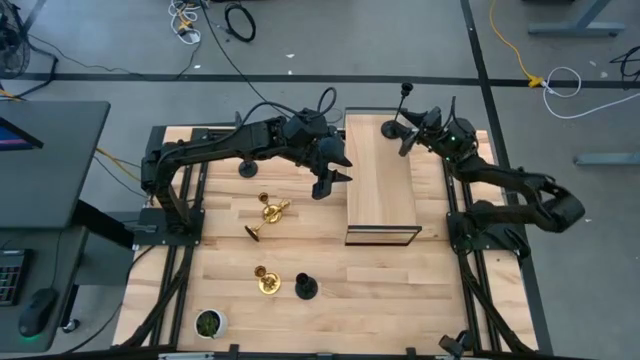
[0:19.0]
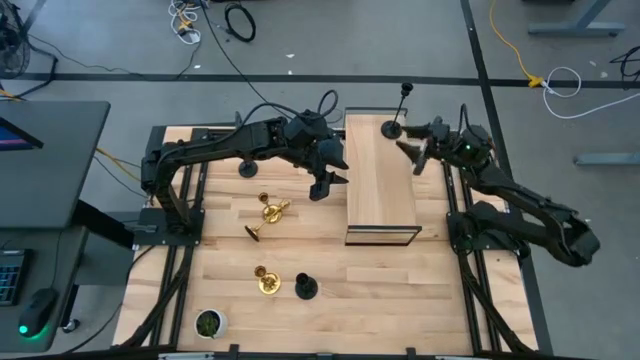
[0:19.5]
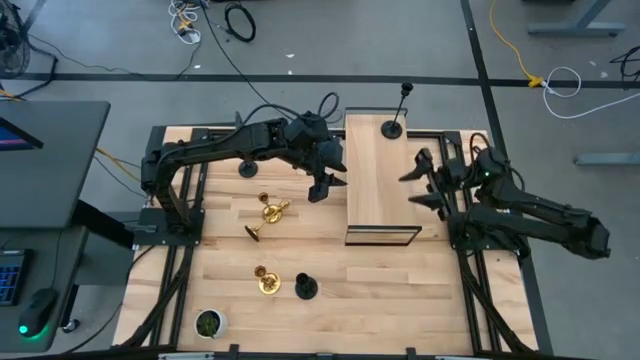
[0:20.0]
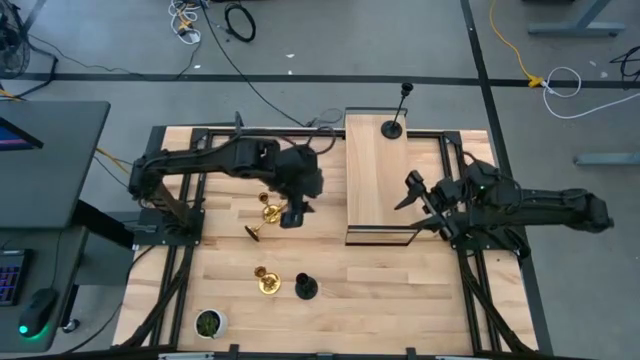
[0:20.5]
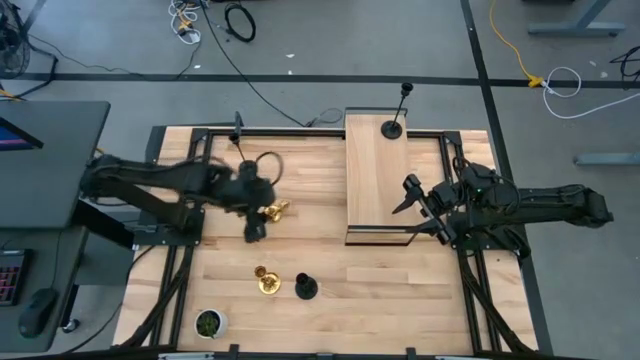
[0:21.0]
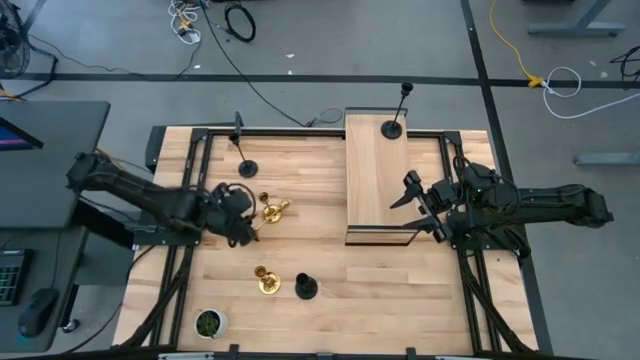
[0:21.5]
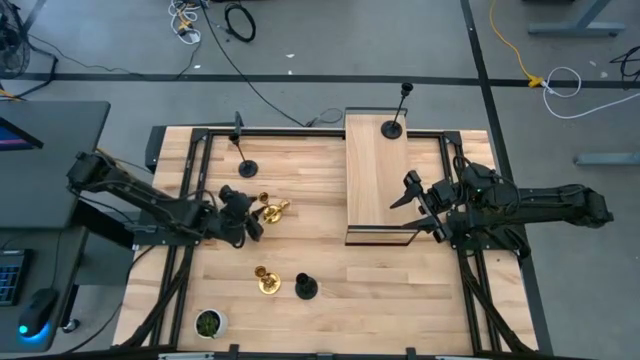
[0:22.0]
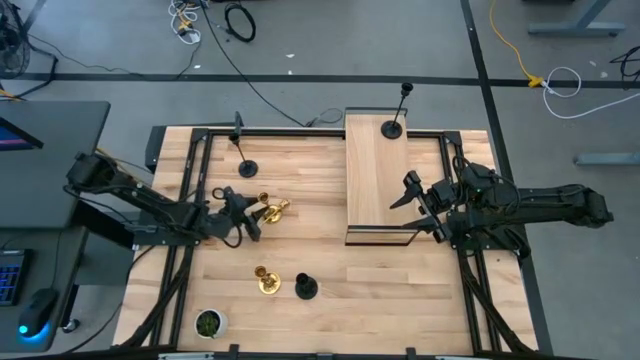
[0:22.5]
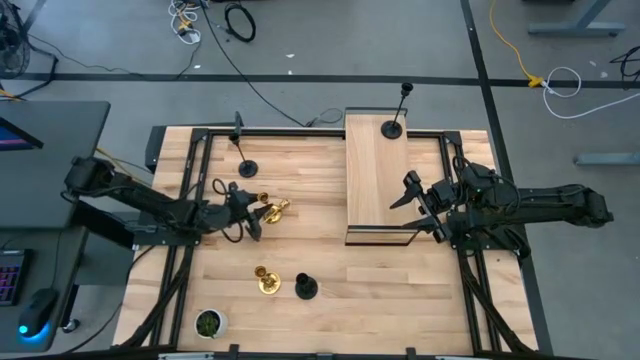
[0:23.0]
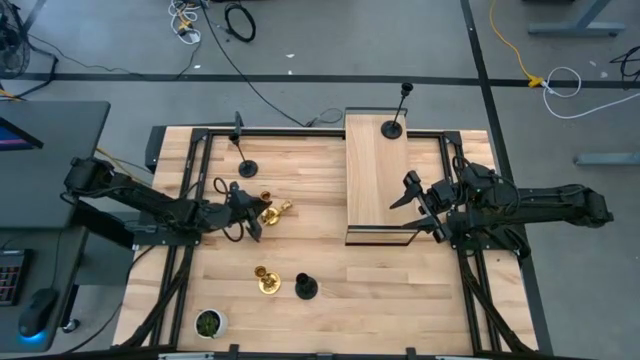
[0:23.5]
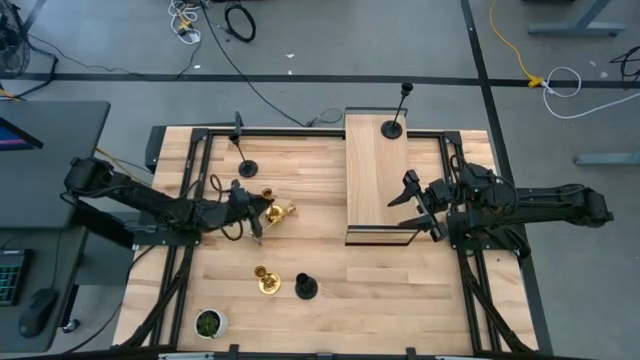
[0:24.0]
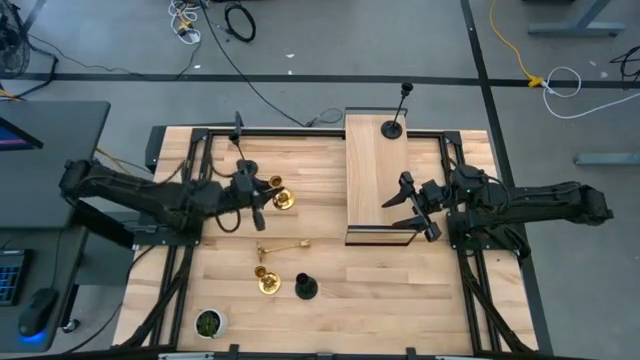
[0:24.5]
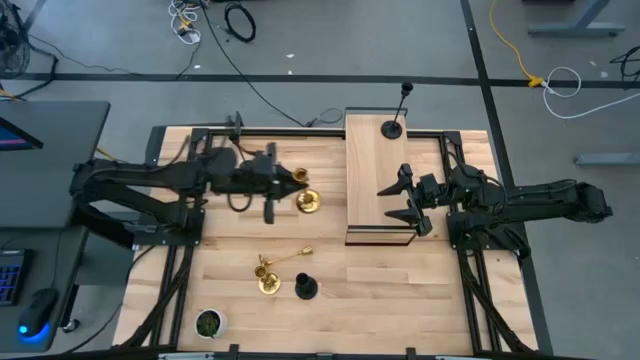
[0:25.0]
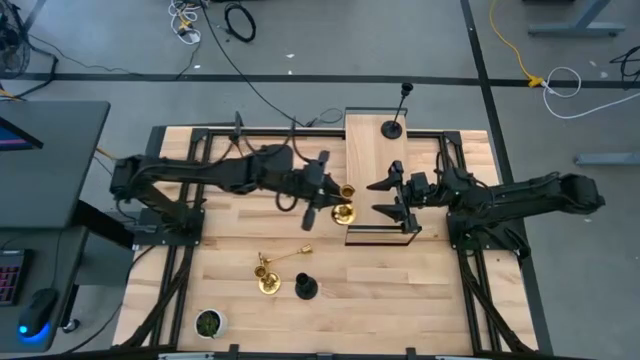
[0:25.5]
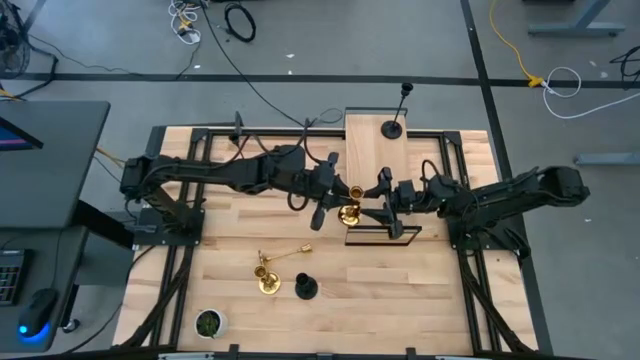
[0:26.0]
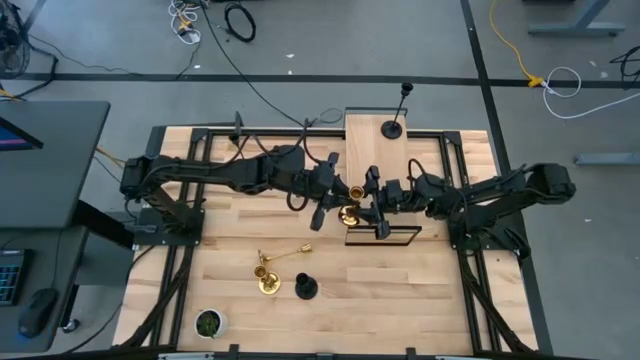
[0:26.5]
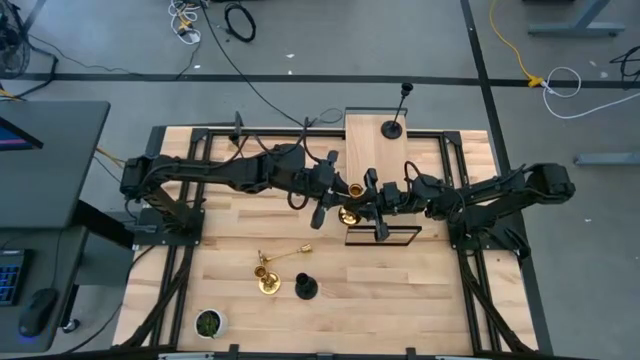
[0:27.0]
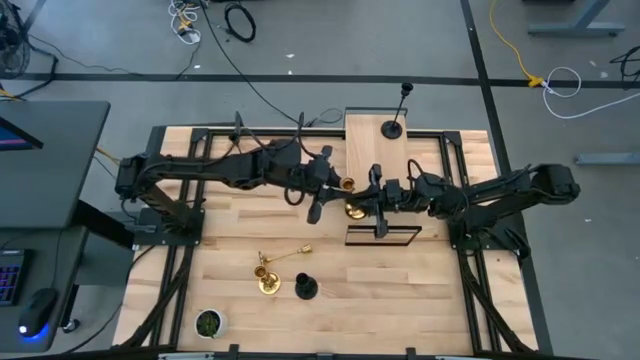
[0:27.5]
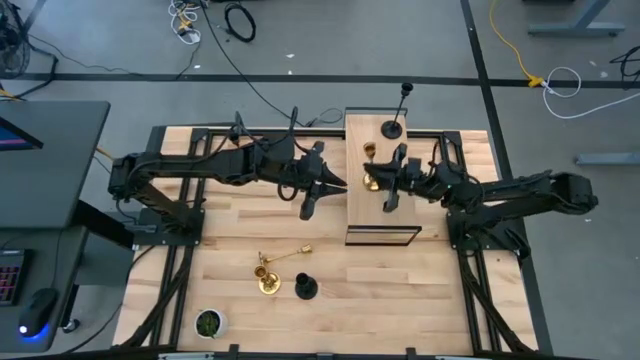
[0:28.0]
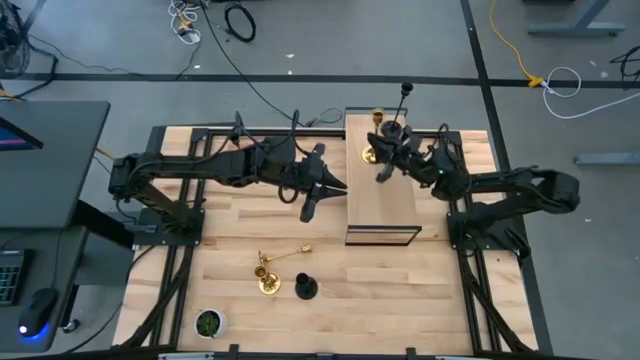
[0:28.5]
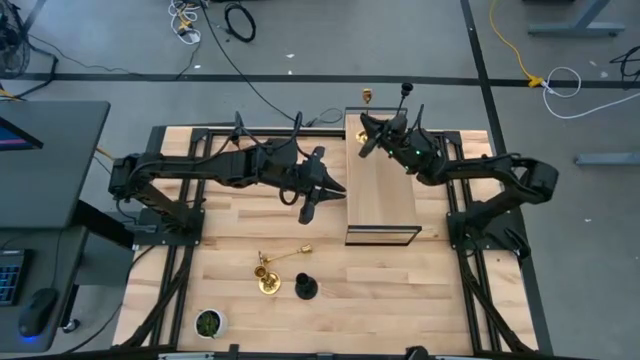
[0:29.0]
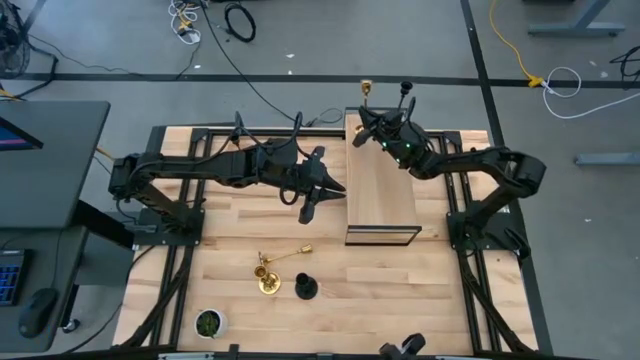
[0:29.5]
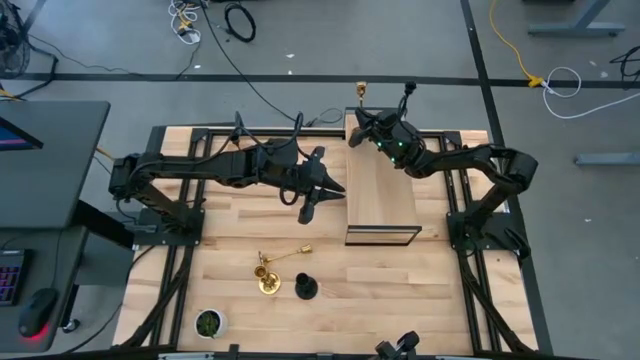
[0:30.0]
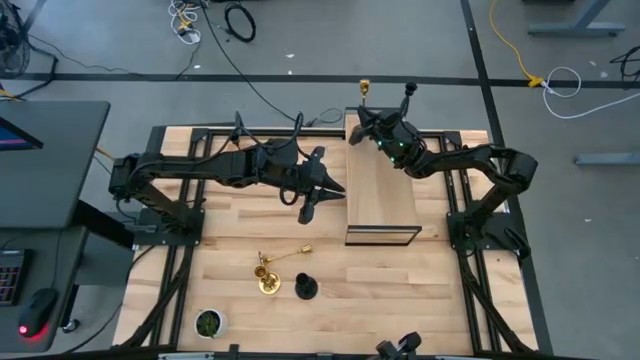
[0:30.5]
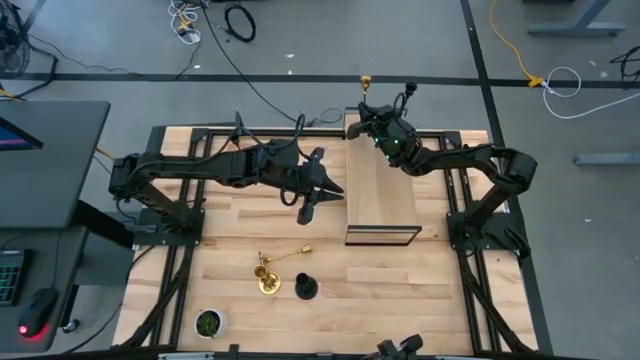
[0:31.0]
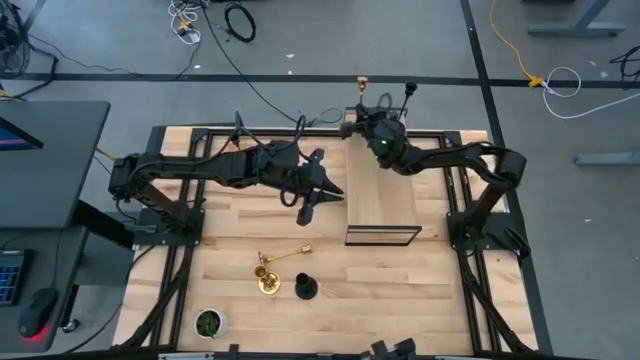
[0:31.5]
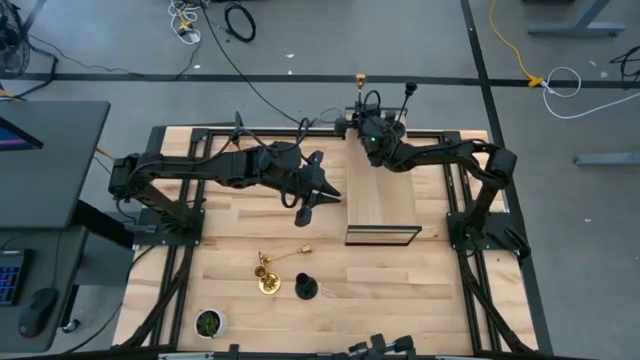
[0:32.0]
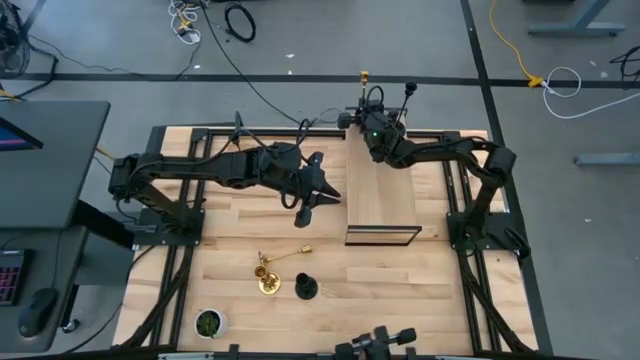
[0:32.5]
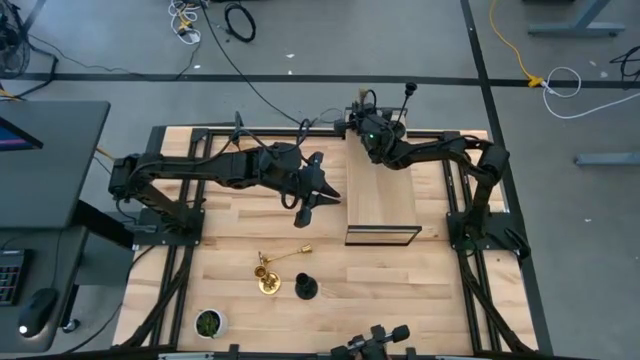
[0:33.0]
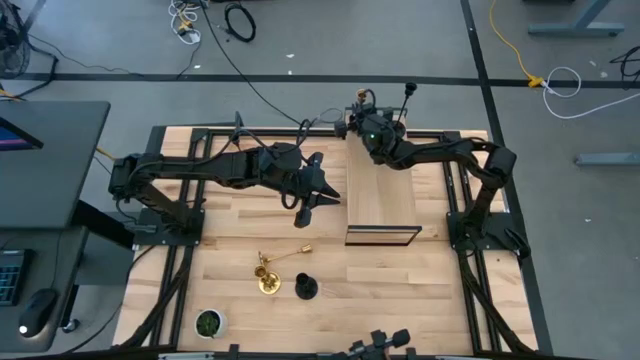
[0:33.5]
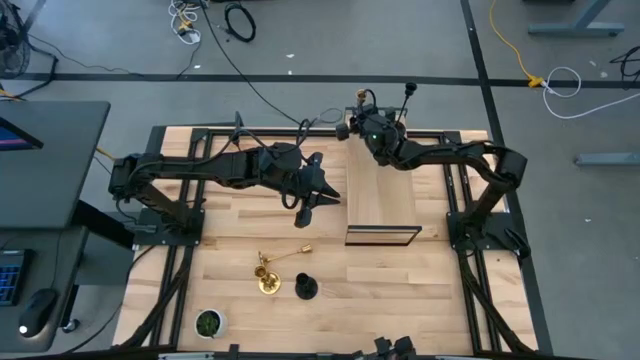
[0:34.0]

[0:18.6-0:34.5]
Task: Pick & Place candle stick holders
Put the top gold candleholder on the shelf

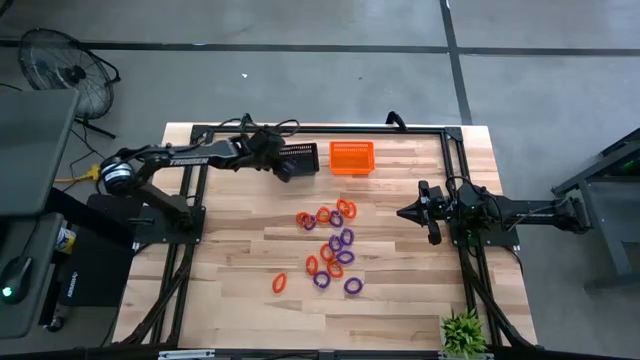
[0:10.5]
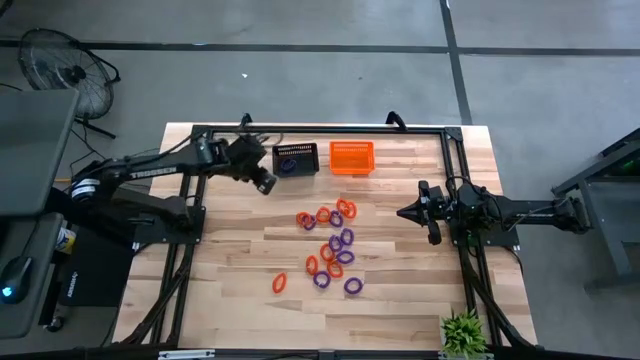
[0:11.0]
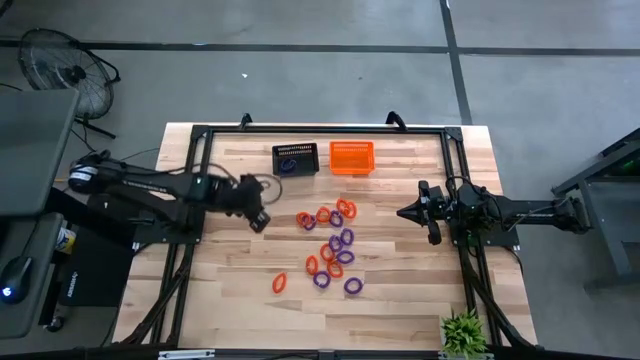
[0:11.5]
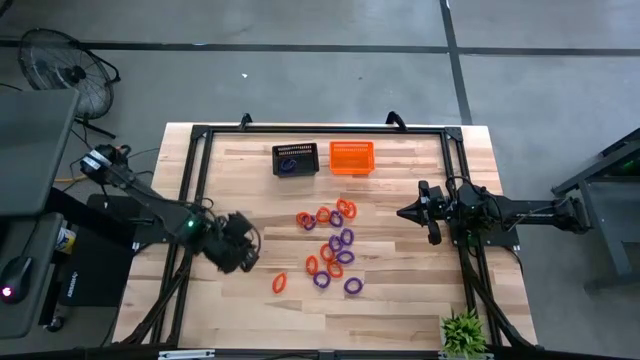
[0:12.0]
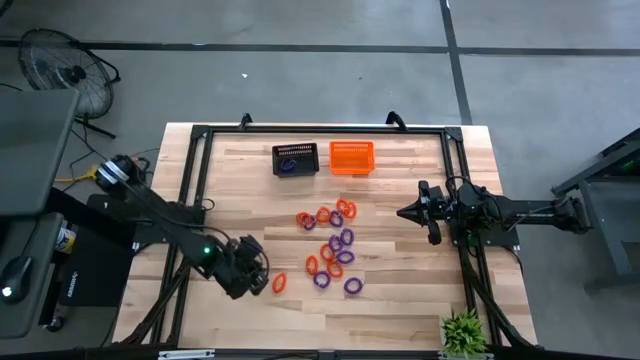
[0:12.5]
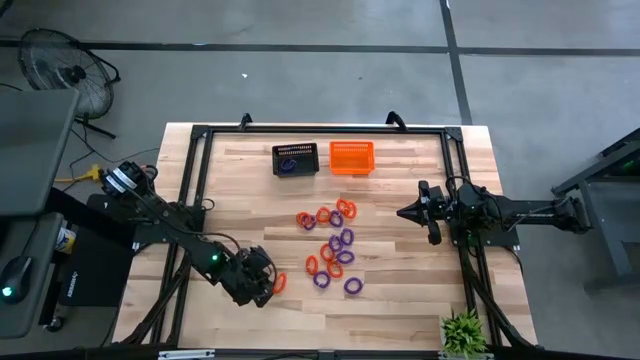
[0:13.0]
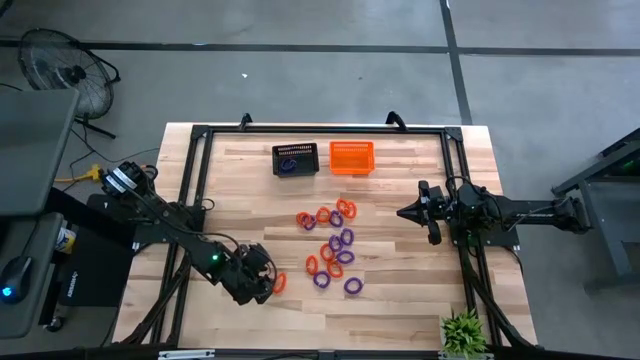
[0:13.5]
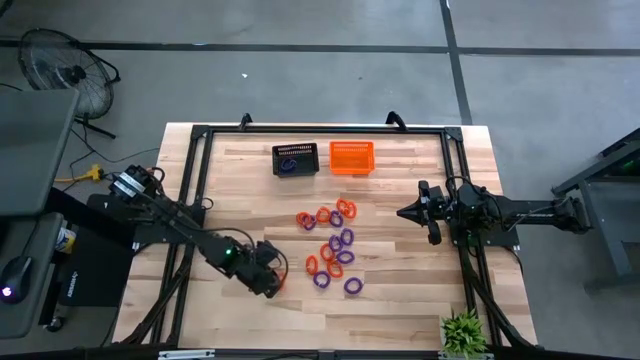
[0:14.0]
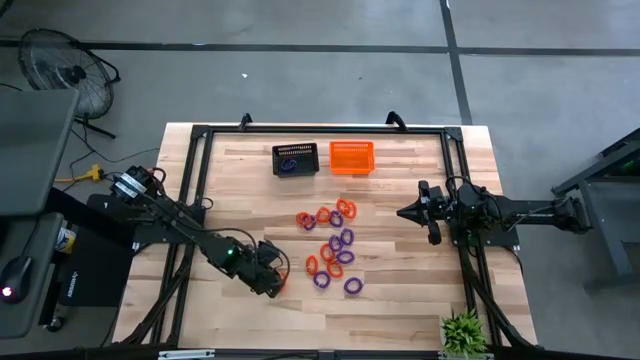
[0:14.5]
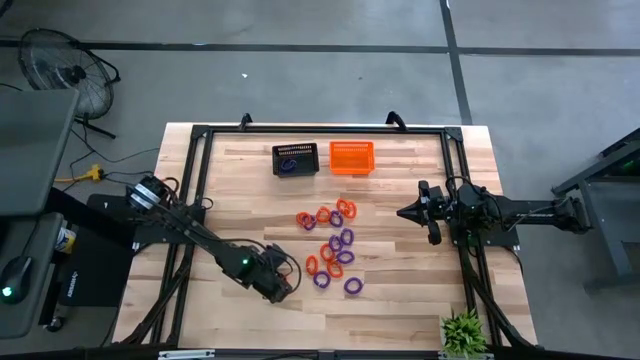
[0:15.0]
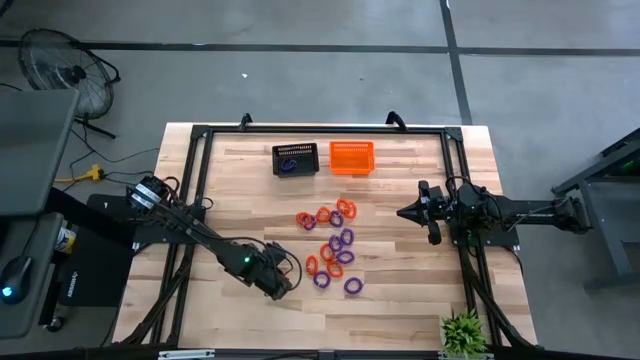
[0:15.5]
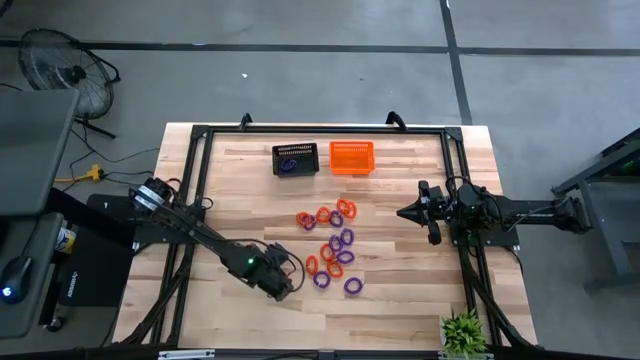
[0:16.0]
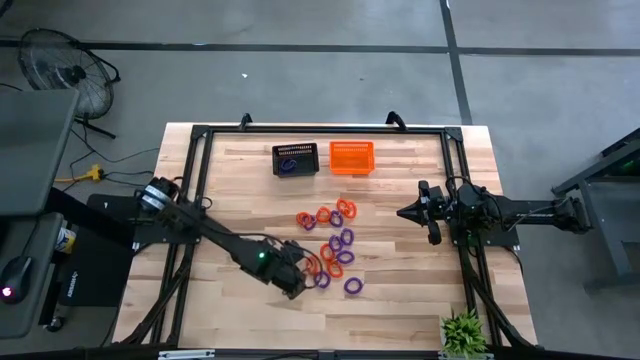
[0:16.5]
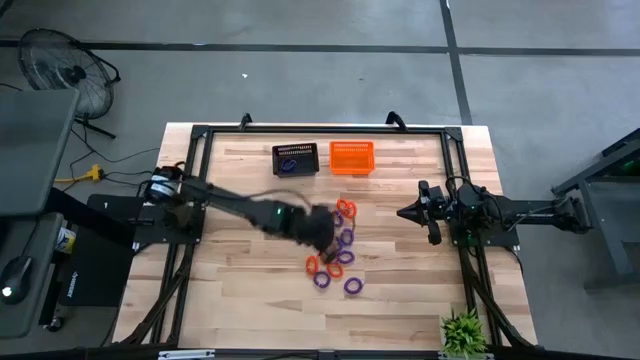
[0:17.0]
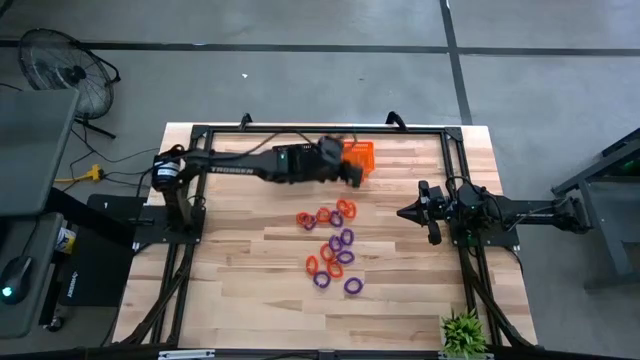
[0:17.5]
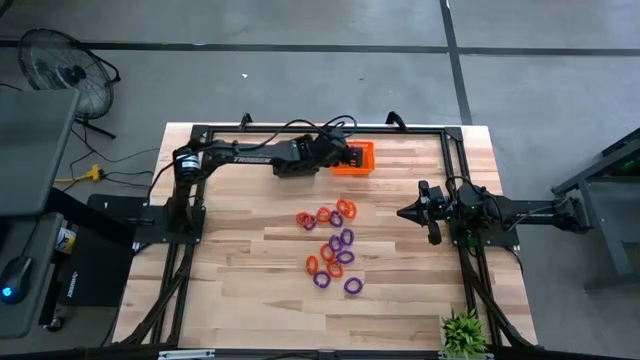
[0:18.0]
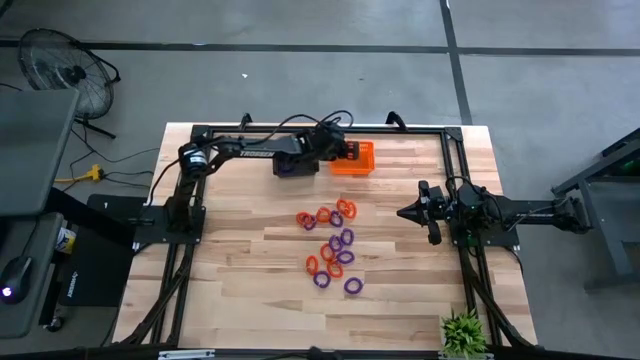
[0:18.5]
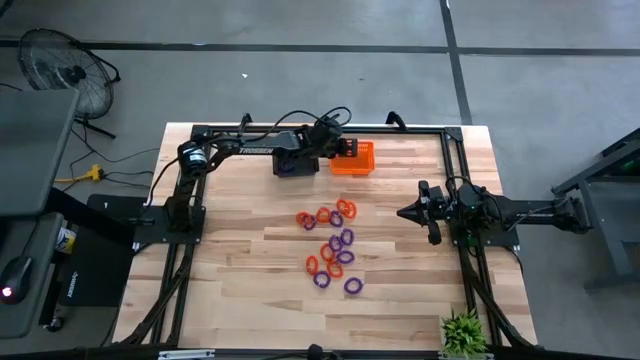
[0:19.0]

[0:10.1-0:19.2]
Task: Sort spring keychains
Put the orange spring keychain into the orange bin
